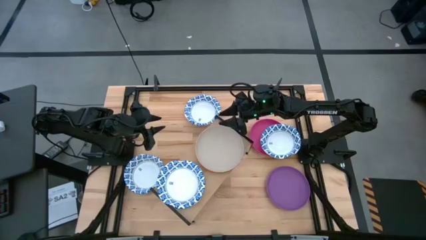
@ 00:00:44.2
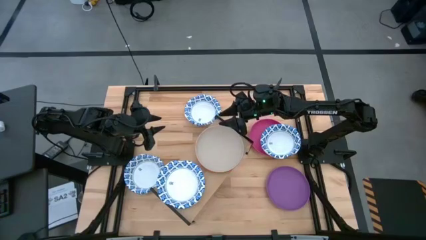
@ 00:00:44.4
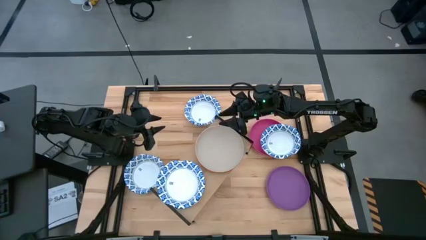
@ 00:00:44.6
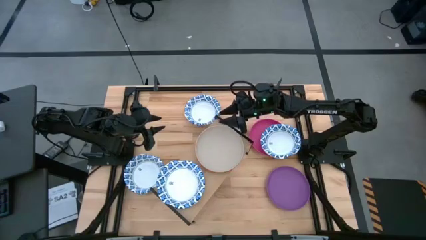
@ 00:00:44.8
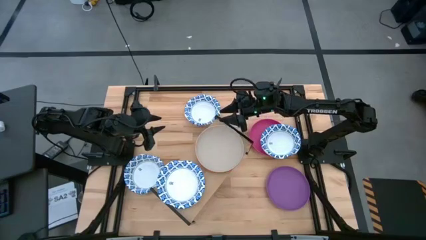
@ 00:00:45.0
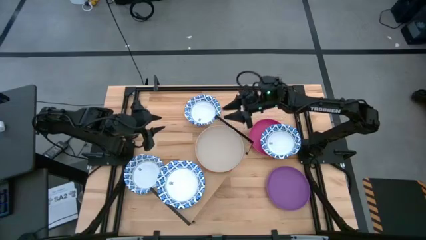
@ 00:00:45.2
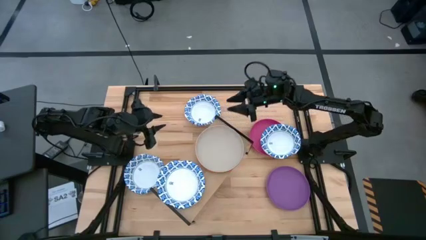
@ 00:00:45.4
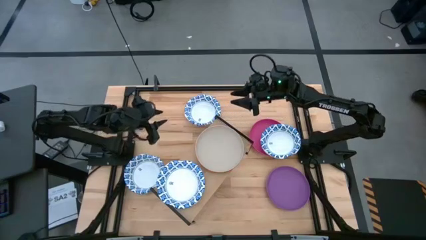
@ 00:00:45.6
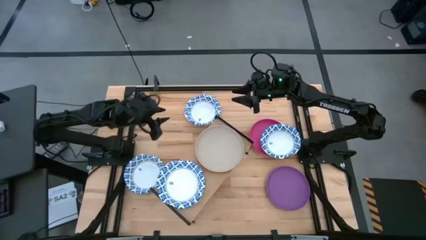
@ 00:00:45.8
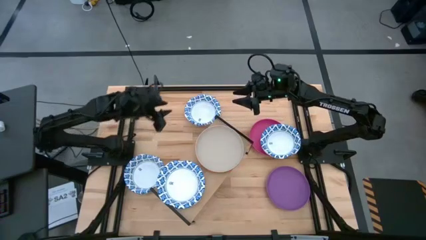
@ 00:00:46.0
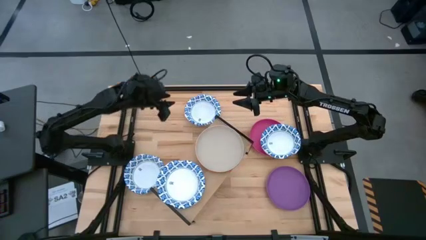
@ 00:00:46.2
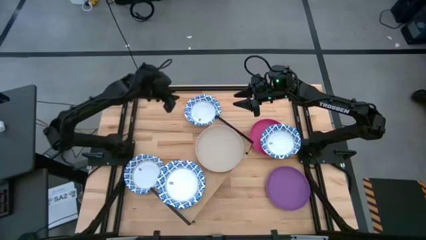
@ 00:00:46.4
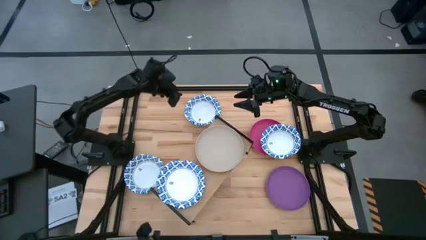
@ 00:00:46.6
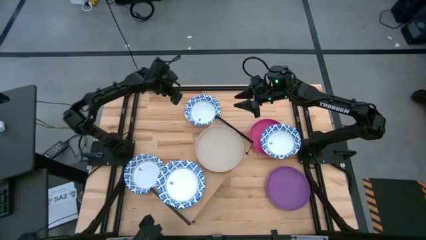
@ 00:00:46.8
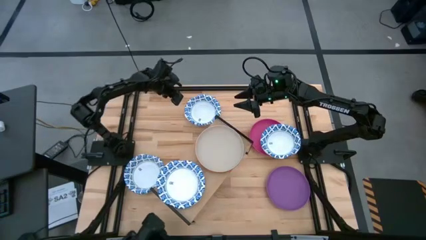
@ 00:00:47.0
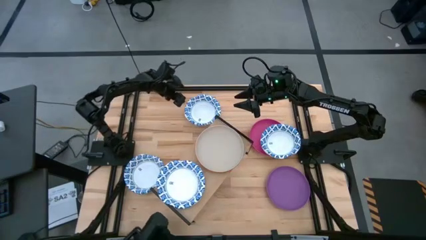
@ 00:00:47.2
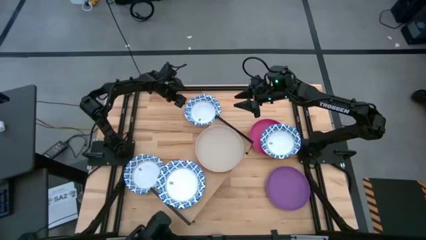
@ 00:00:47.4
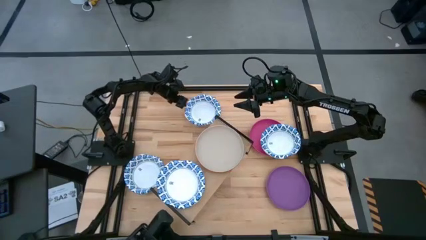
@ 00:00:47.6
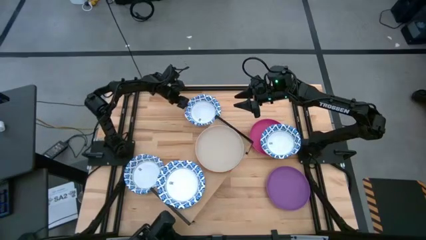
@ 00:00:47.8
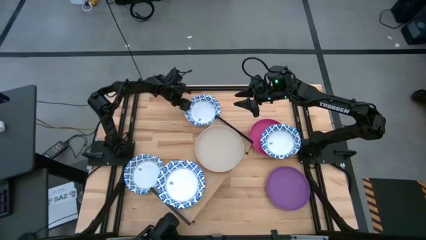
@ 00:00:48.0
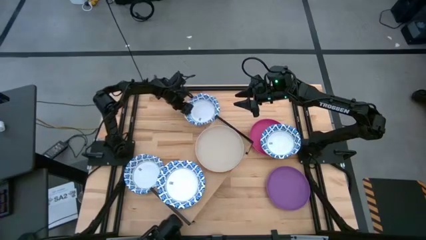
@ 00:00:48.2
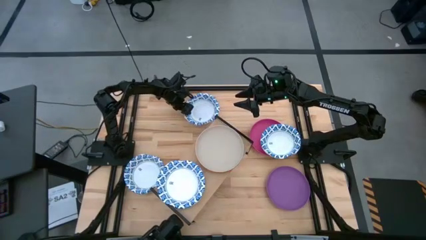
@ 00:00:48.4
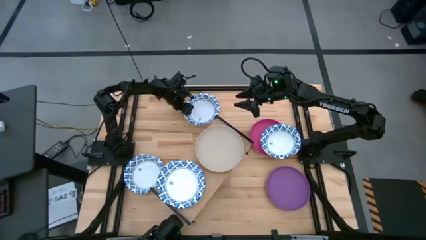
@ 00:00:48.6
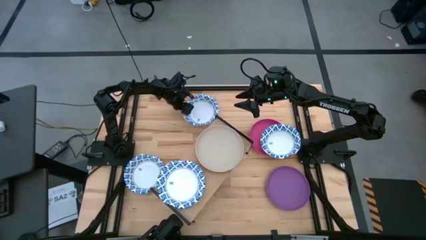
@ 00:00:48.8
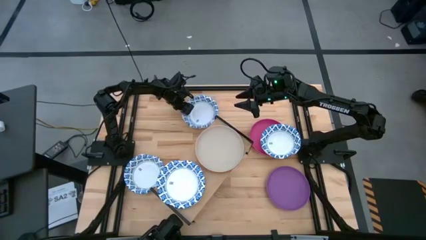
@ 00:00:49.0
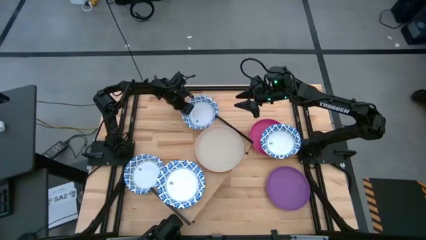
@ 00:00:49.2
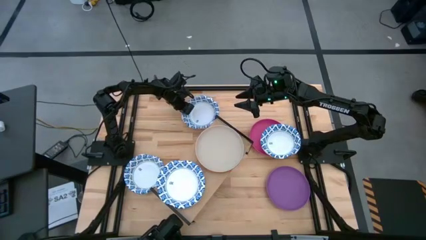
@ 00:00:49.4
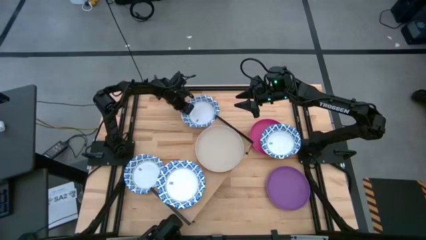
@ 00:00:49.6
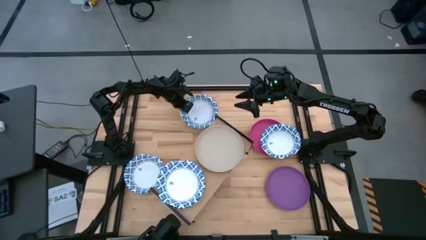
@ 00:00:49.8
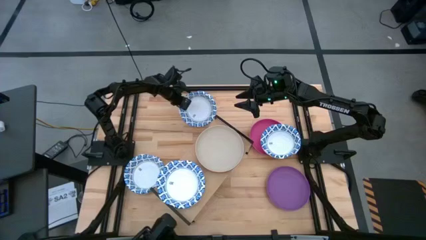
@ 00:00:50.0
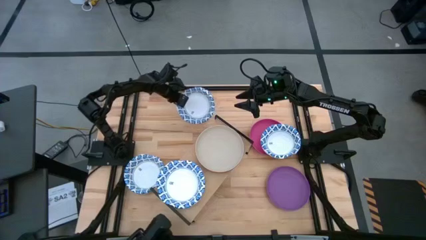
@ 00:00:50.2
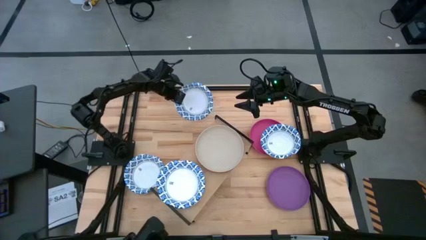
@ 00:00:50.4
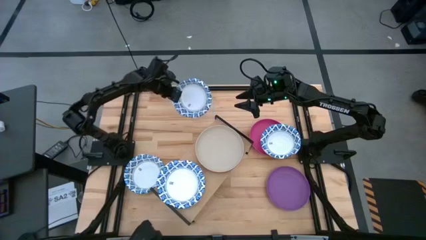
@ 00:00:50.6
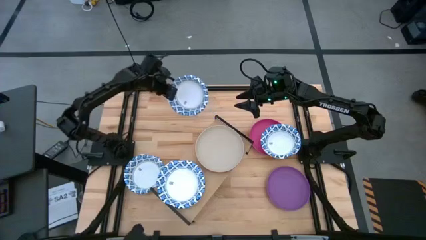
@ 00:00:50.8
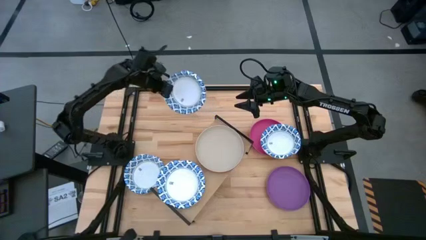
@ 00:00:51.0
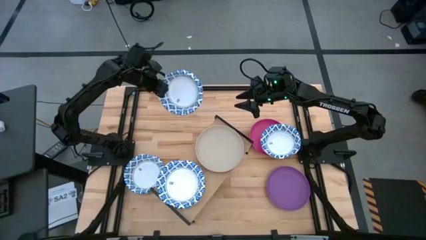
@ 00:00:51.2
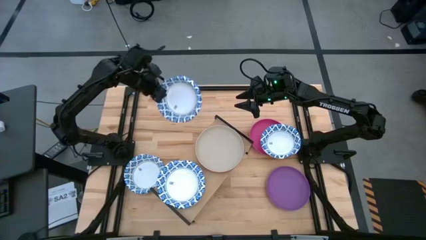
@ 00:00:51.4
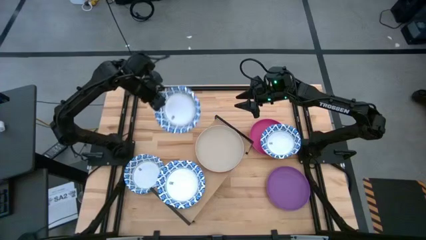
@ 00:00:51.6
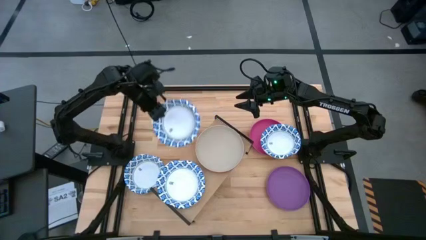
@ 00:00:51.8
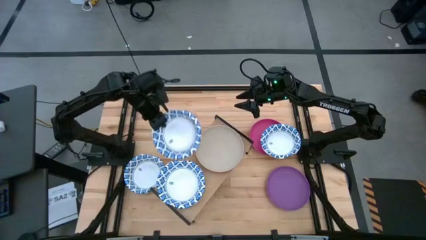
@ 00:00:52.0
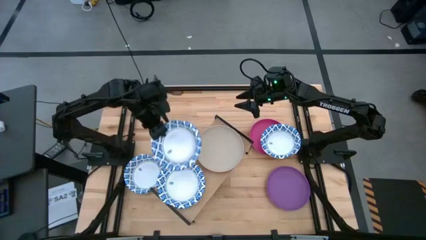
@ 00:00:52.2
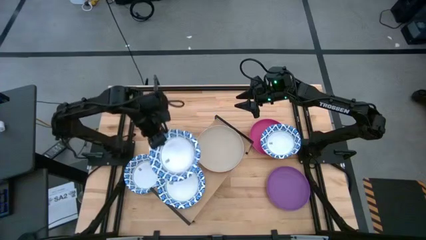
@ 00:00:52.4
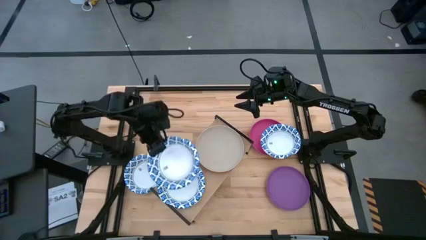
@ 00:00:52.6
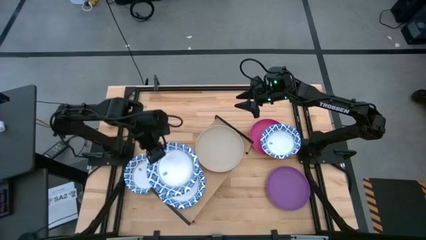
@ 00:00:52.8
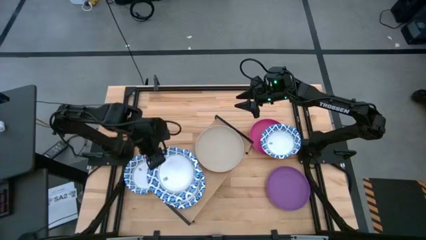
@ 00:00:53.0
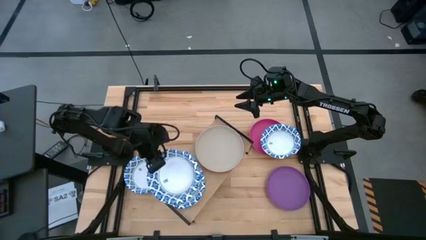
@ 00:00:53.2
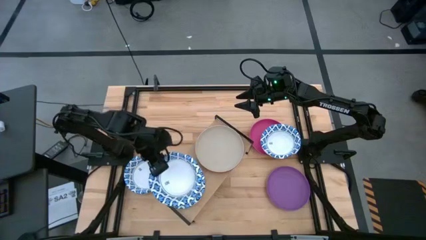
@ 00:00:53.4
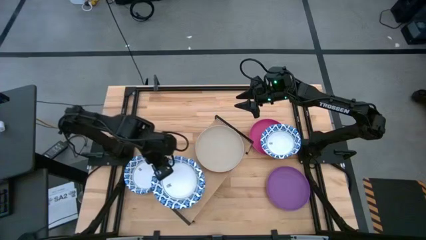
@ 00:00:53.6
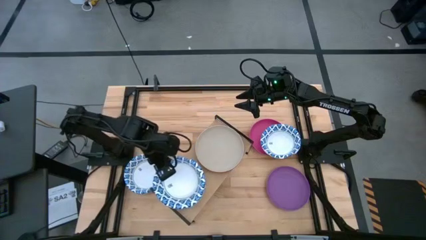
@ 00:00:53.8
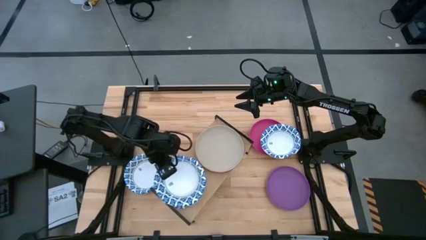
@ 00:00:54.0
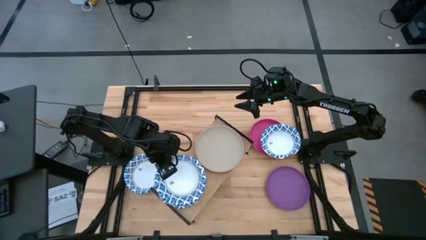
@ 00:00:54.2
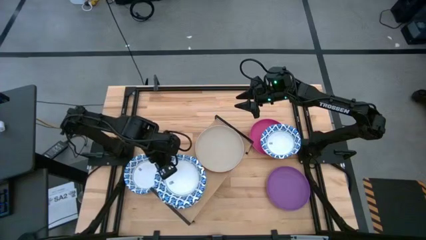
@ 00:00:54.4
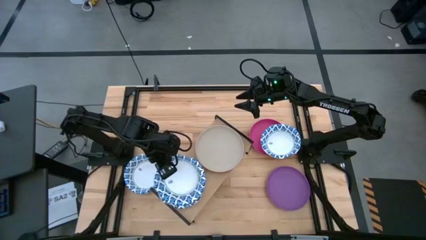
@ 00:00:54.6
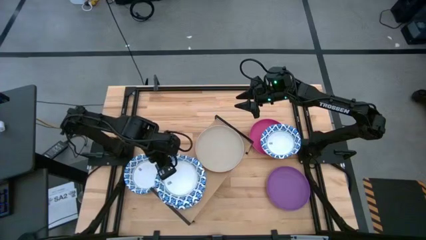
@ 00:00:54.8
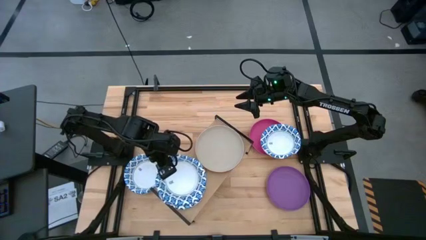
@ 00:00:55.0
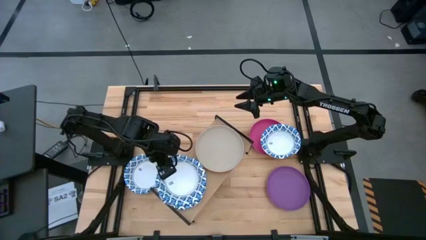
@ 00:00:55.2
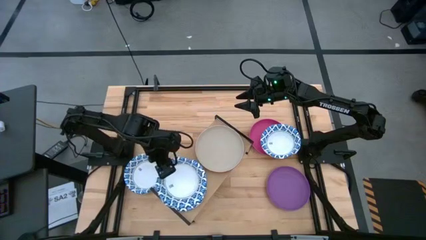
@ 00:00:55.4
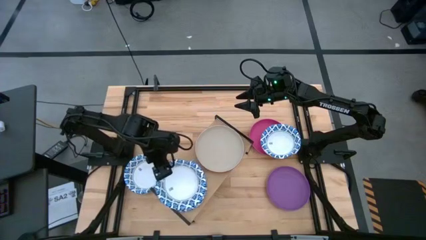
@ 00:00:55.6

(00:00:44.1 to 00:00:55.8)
Task: Place and stack plates onto a shelf
Stack the white blue patterned plate on top of the white blue patterned plate on the shelf
